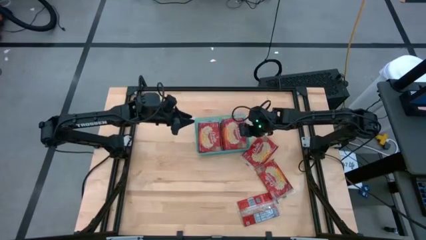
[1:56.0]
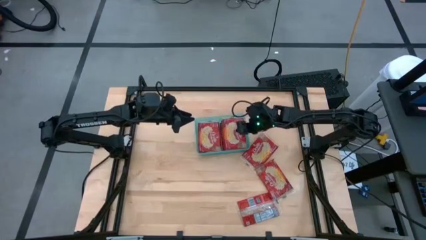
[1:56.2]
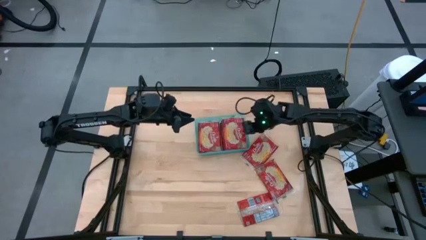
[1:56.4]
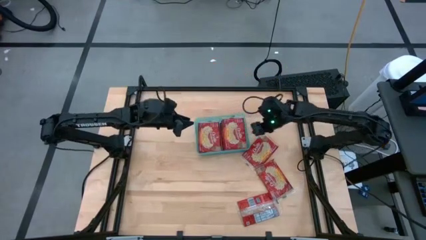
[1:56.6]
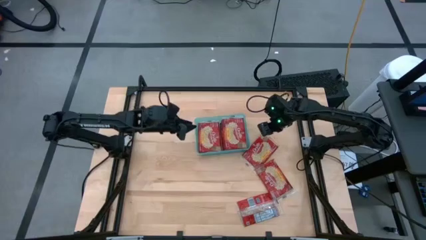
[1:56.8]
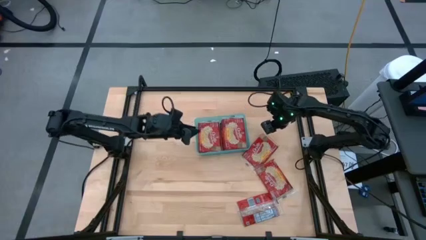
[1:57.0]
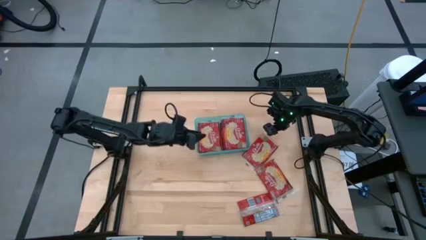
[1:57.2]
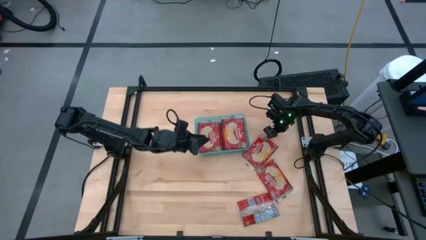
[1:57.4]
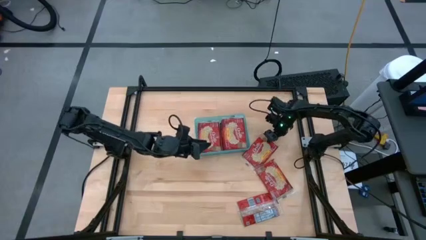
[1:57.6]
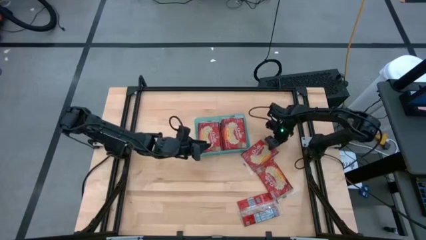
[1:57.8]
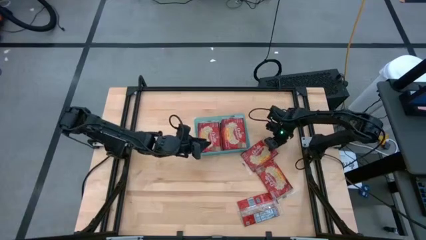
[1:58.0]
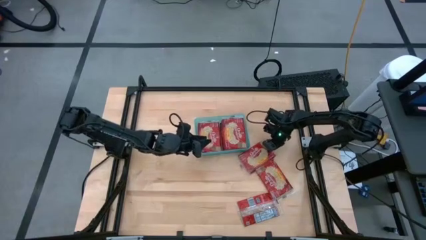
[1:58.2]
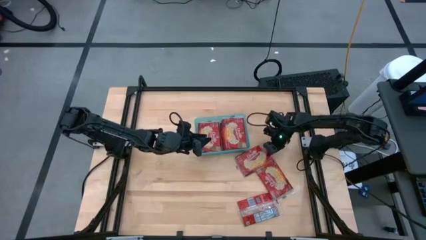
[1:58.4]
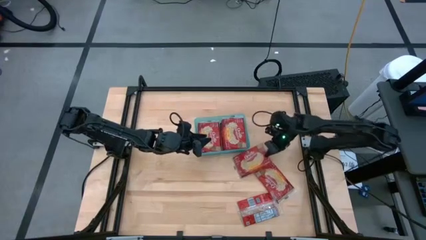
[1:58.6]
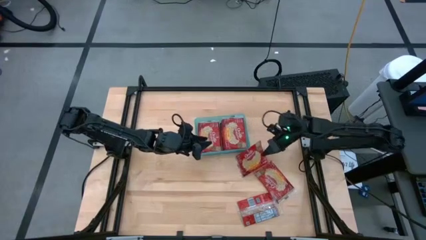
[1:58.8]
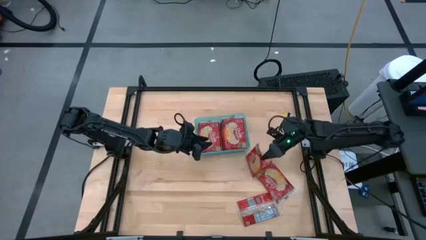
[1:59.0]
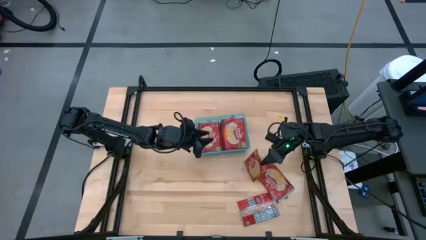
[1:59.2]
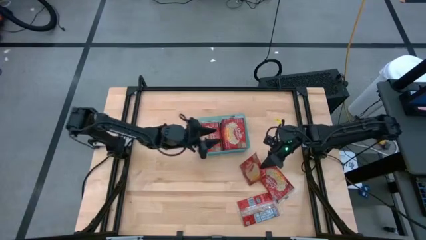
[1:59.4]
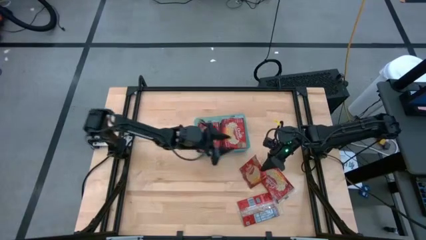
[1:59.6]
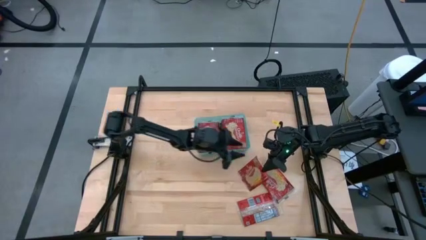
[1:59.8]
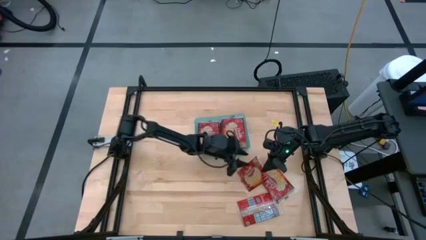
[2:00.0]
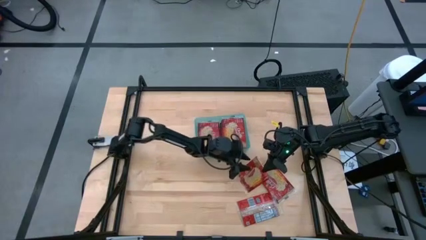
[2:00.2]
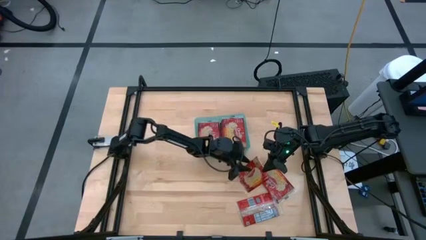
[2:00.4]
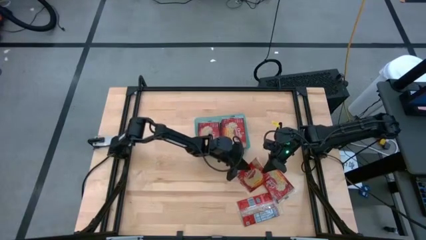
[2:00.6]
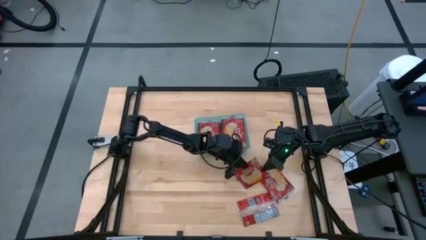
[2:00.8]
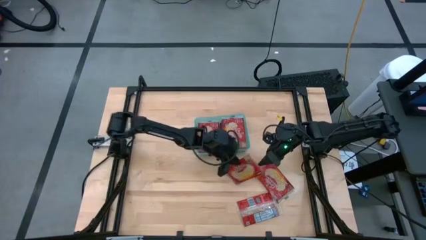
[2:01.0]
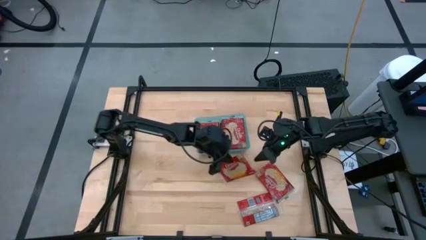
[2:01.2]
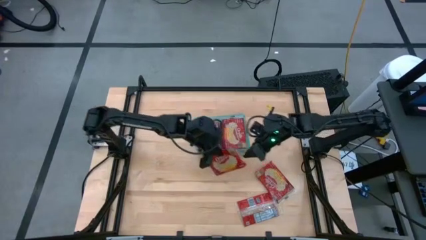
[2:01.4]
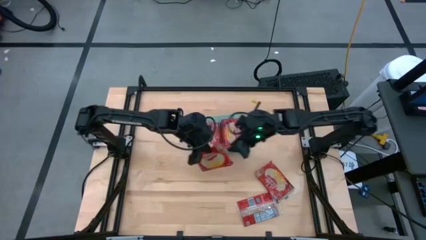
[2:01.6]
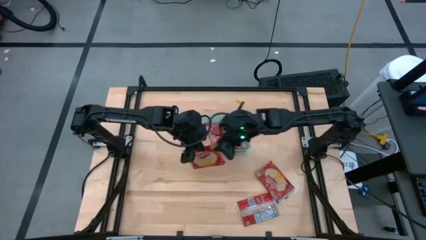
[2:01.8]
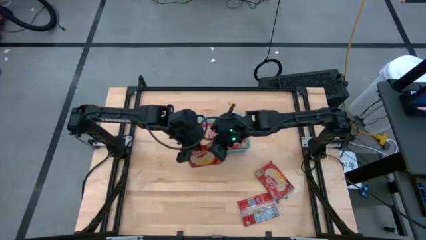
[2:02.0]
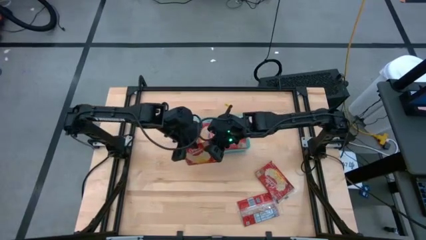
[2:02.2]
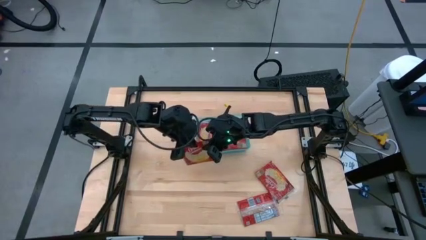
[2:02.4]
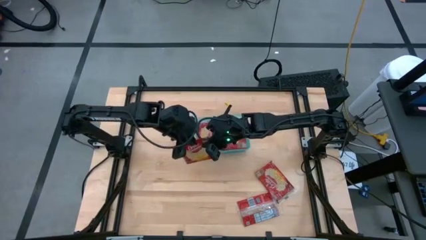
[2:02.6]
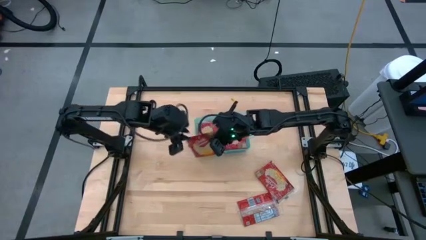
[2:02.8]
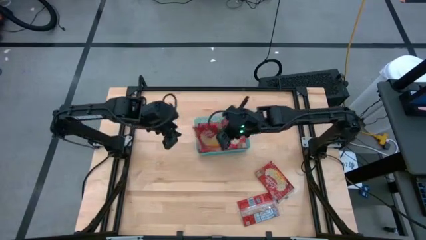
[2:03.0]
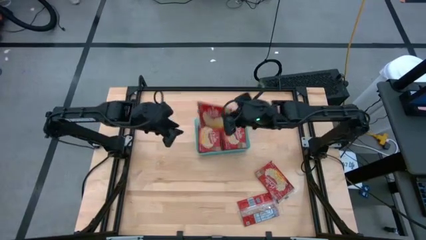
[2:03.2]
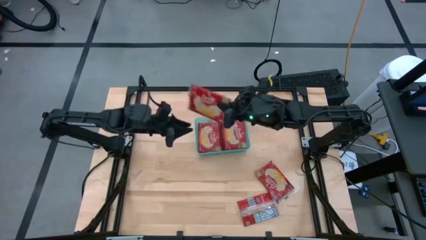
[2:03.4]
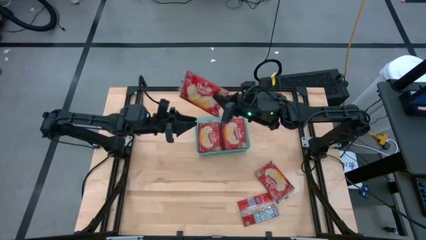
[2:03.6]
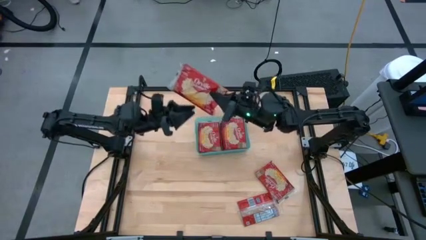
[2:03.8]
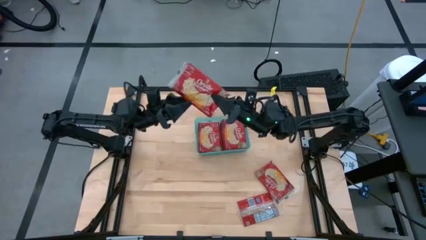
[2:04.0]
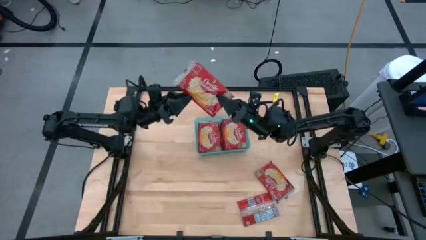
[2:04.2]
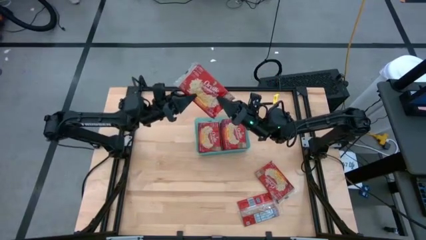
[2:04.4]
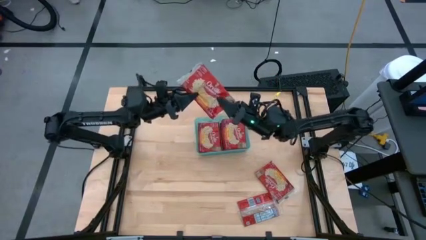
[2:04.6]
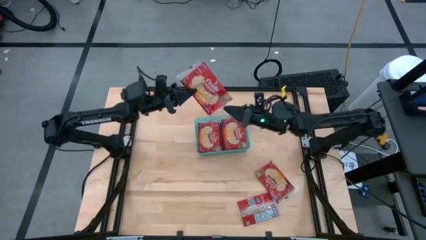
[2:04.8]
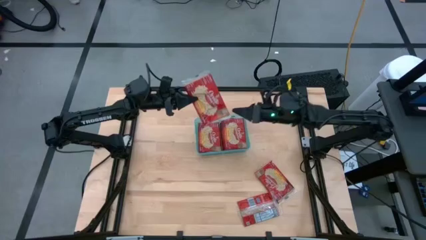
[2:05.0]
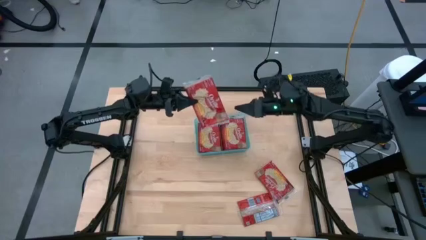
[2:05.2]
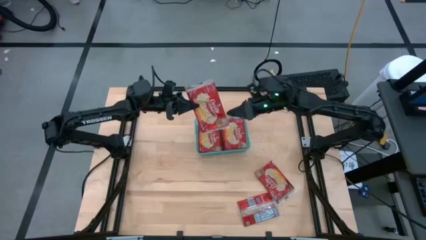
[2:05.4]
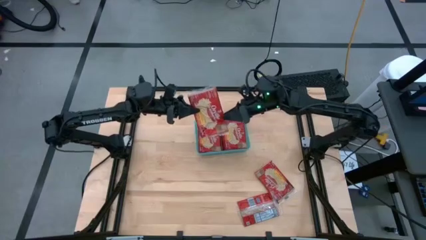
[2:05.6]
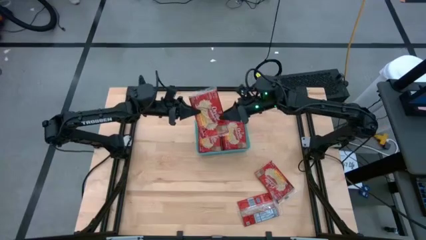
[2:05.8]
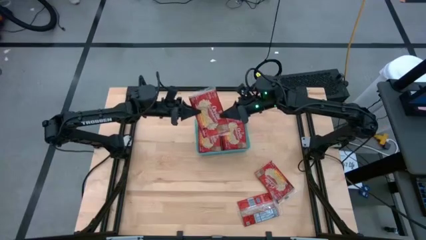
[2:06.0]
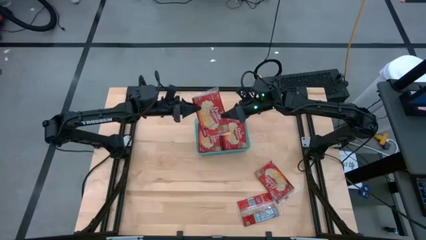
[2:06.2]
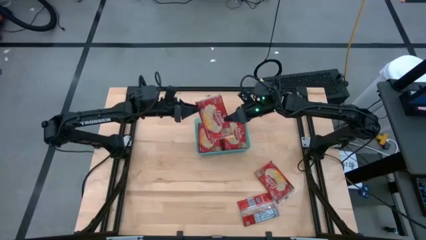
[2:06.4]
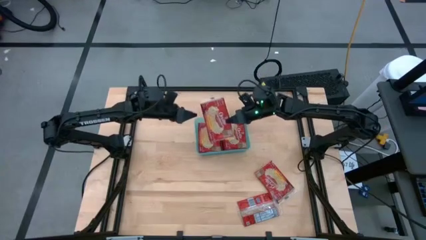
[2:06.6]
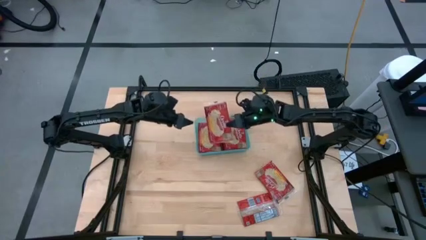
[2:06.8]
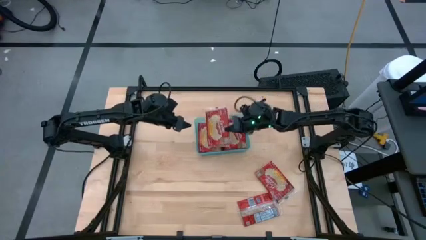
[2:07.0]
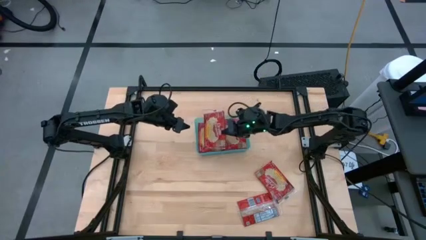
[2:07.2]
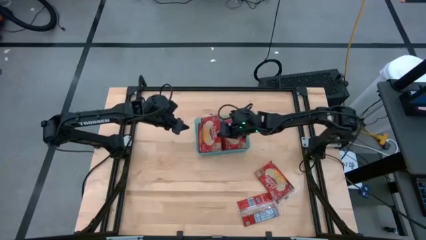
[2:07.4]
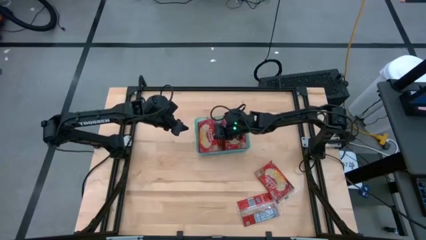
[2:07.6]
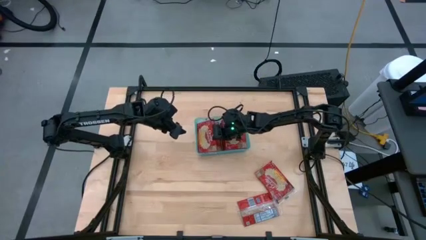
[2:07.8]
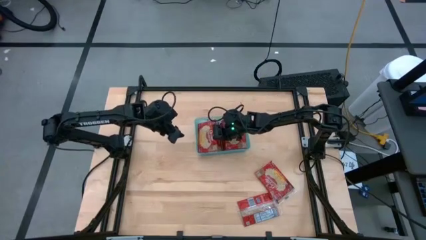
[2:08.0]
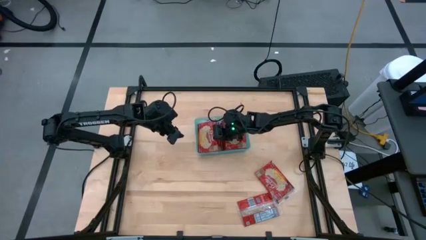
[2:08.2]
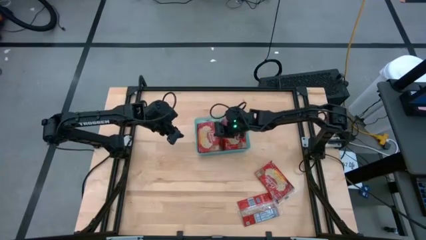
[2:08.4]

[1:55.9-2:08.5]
Task: Sort popcorn bags into baskets
Put the red popcorn bag into the green bin
